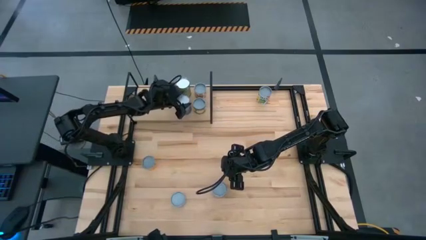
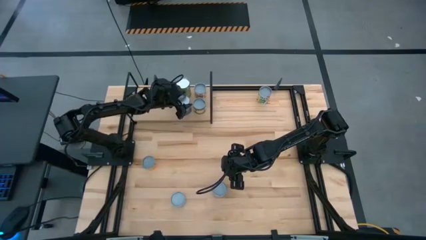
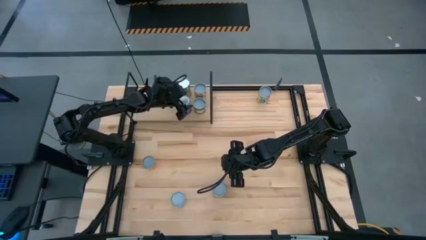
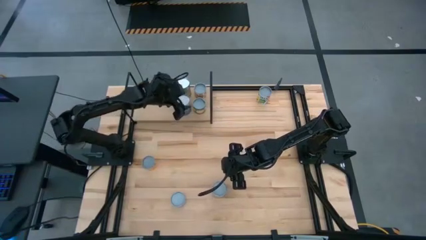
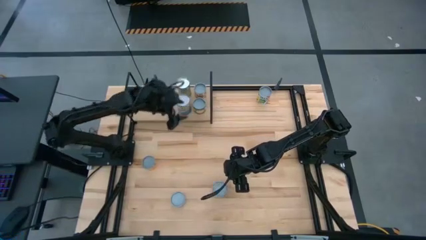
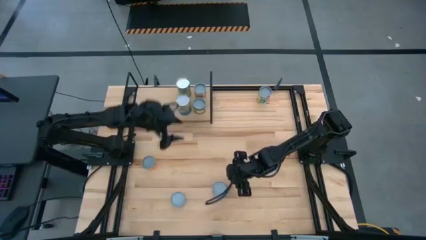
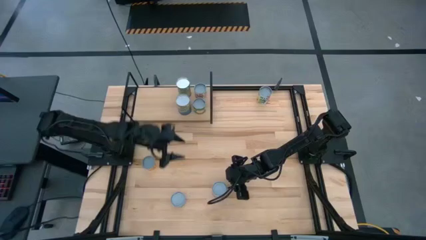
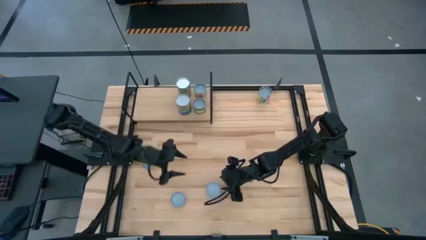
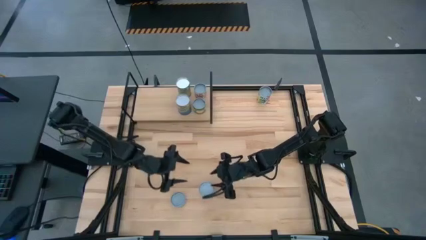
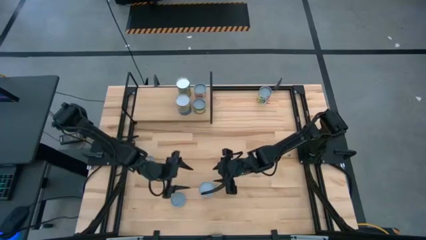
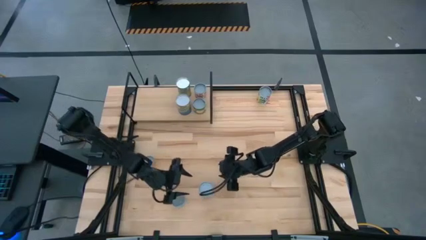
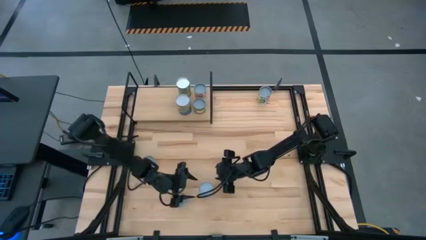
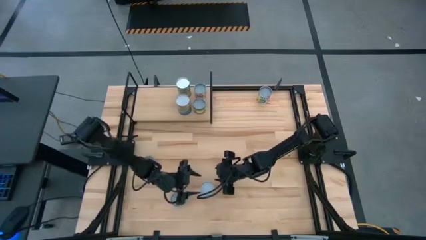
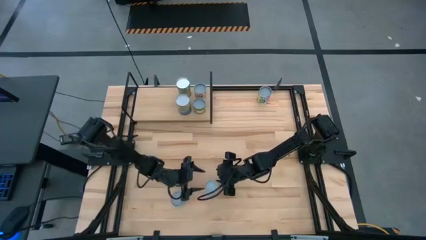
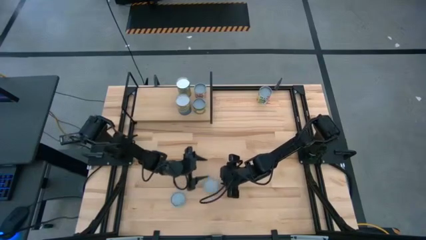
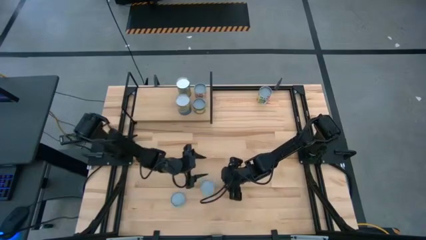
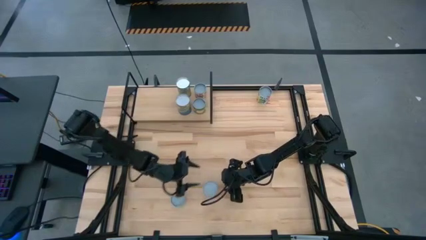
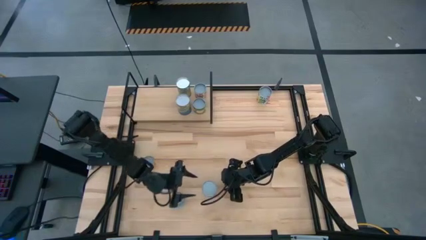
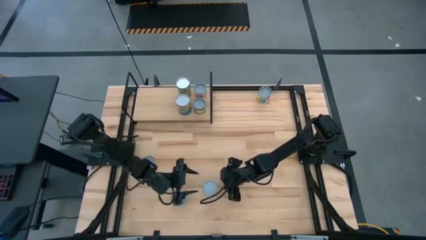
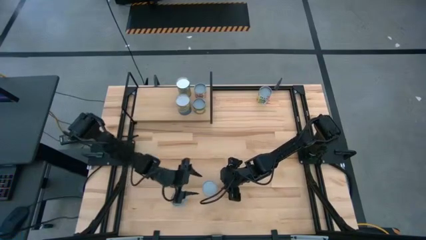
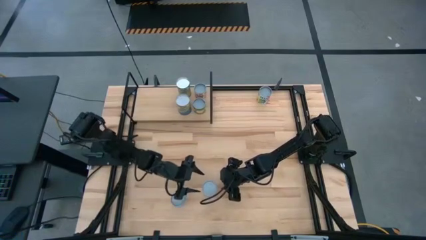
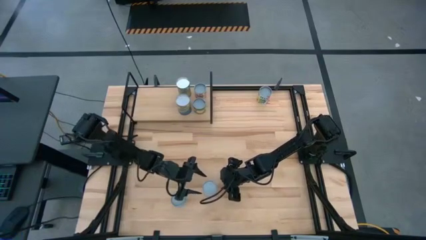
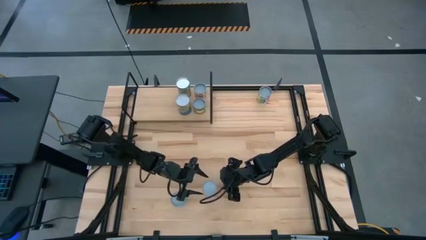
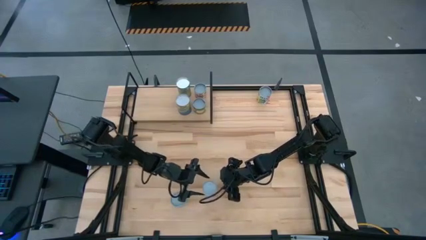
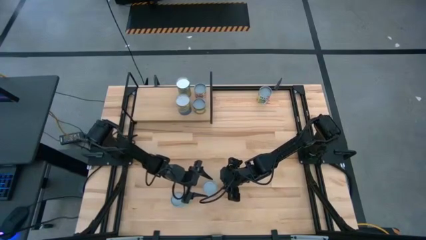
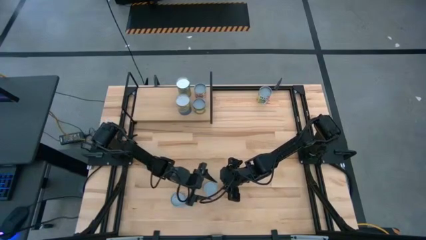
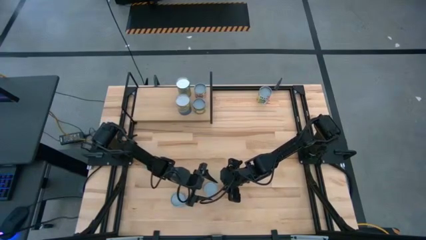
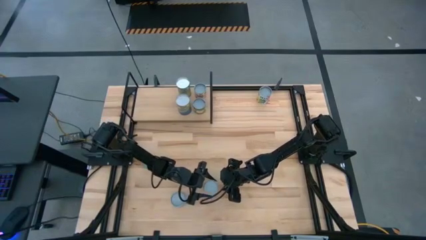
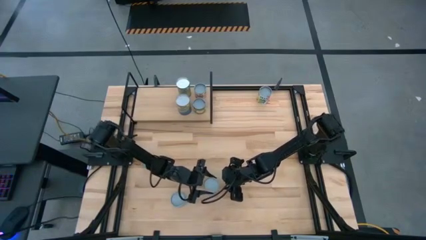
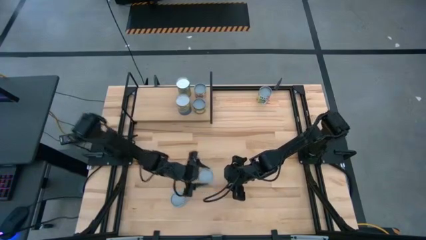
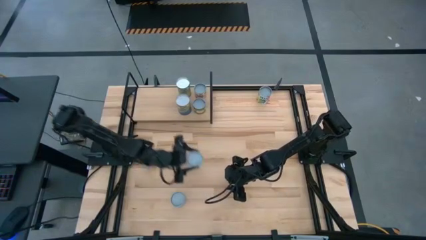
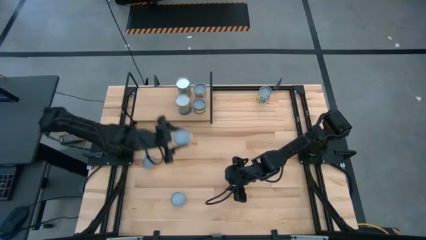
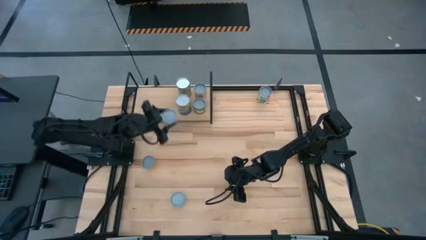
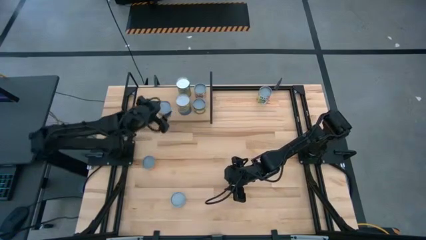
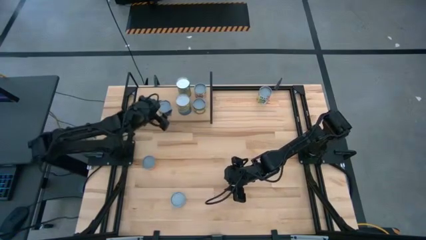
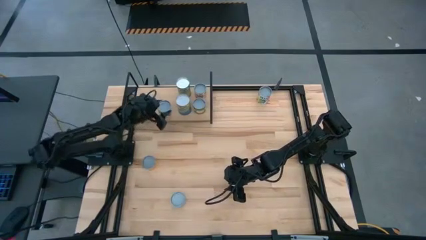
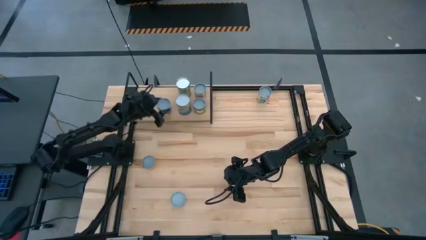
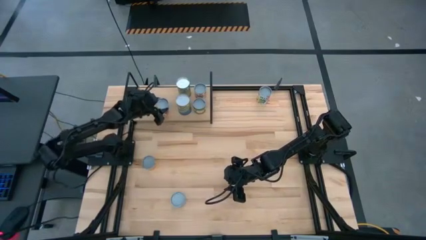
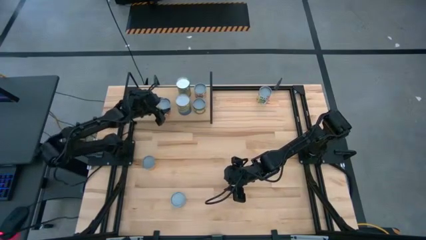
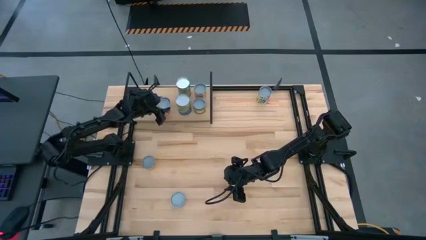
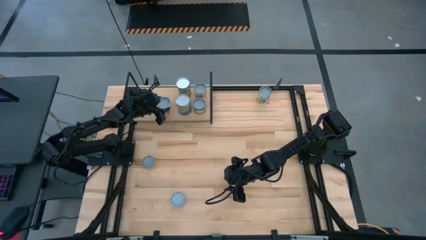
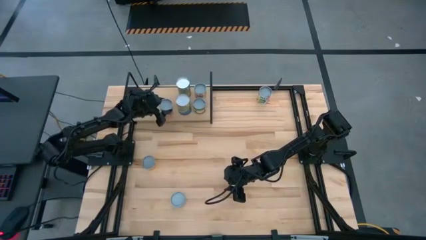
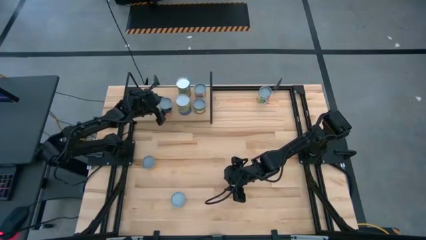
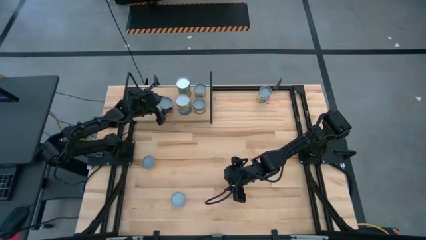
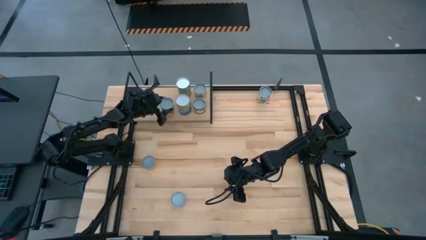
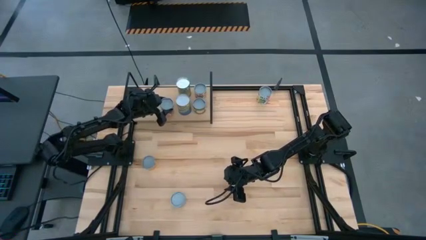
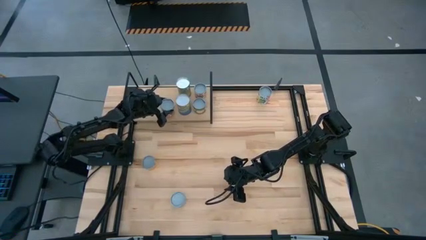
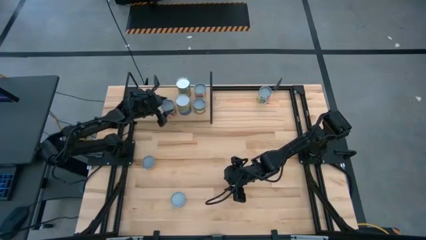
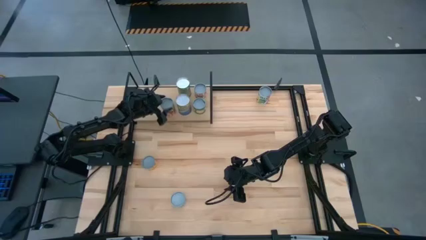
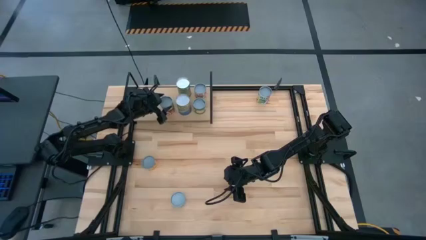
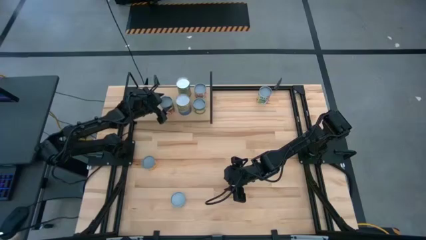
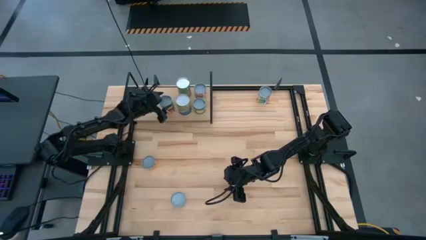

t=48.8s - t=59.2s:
Task: Pick and place cans onto a shelf
Put the canned spaghetti sauce on the shelf

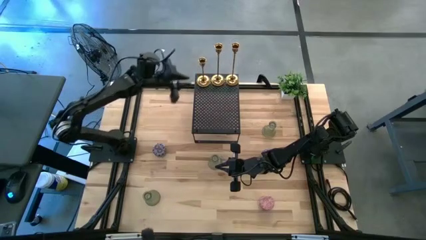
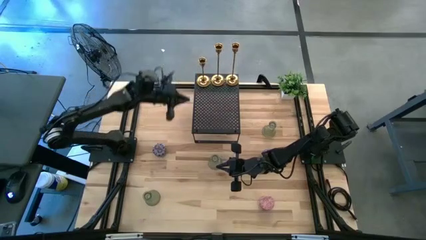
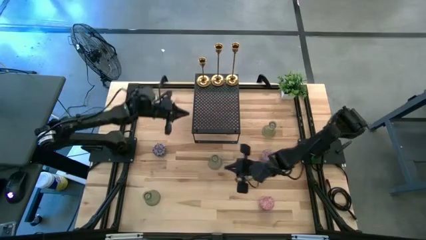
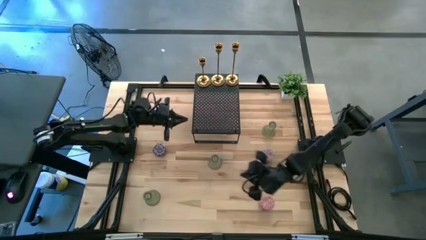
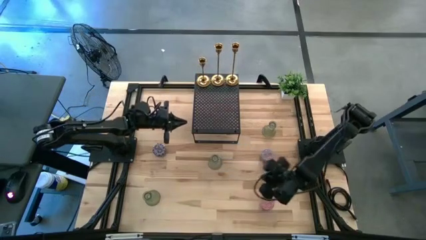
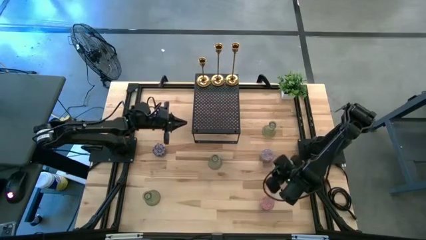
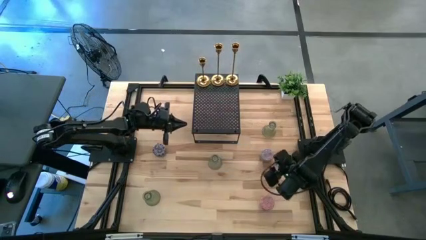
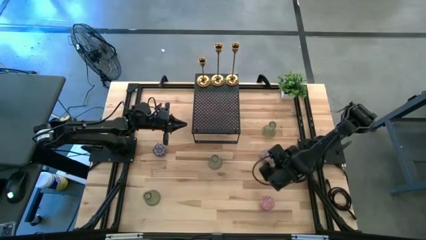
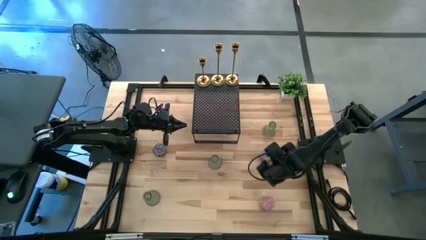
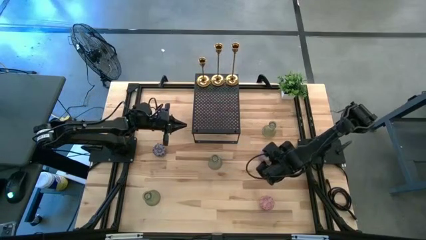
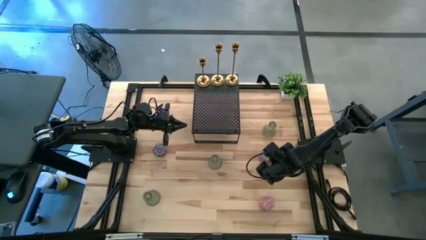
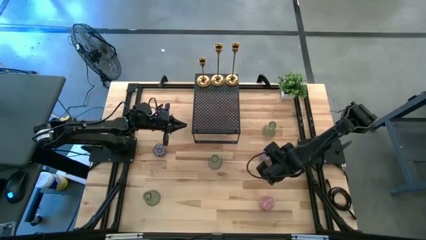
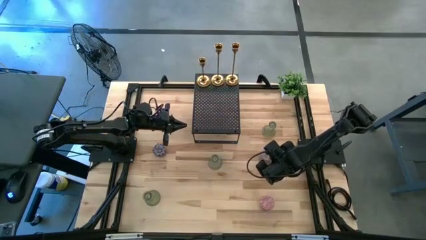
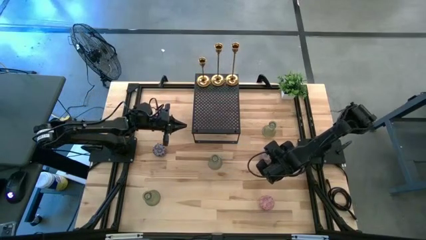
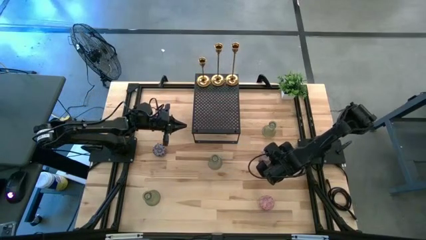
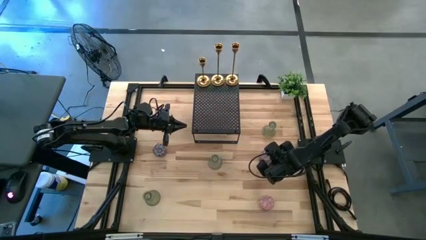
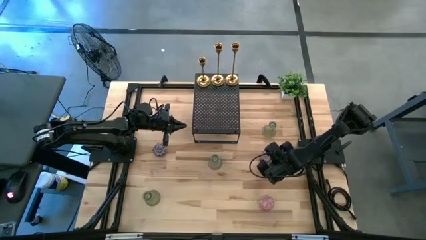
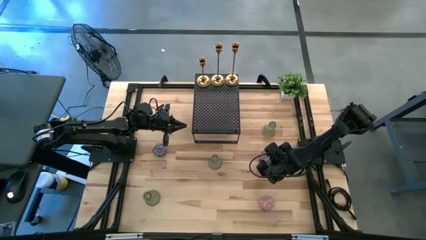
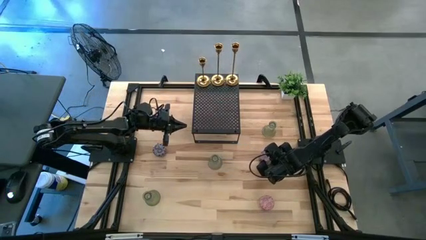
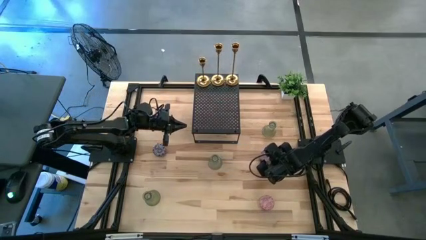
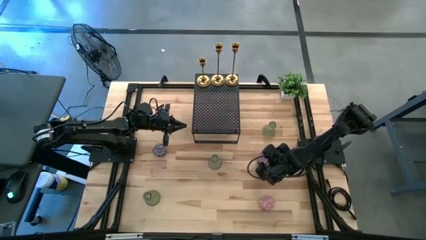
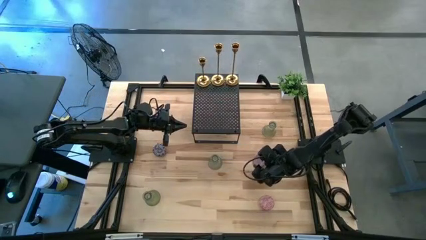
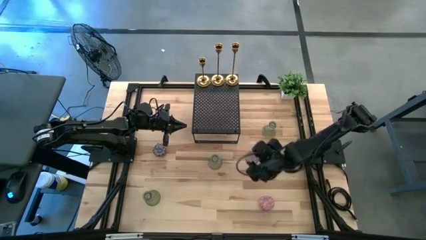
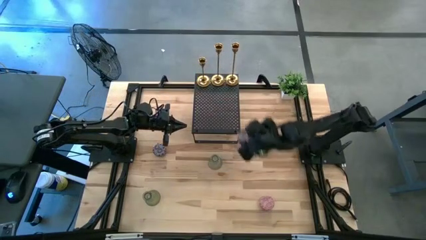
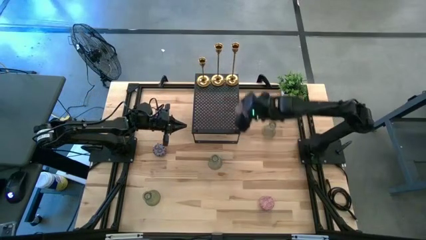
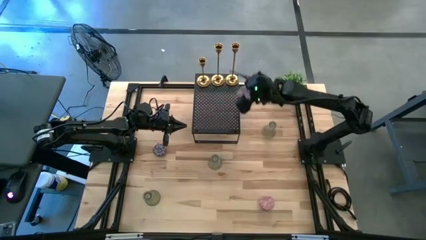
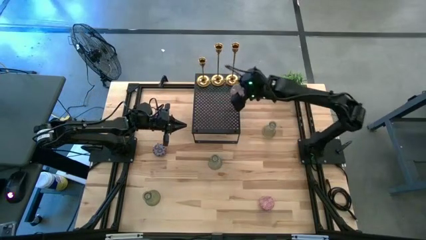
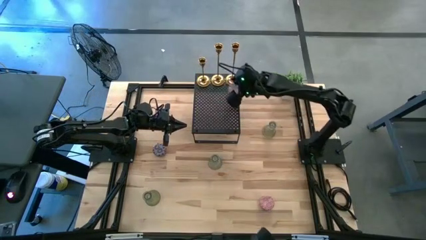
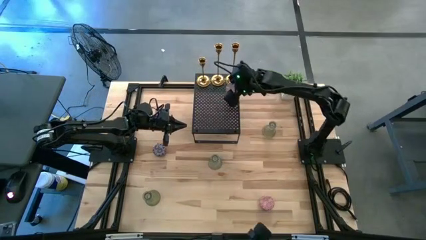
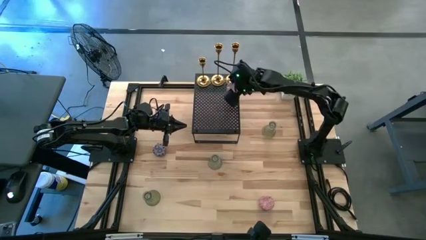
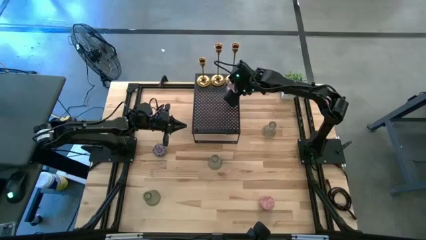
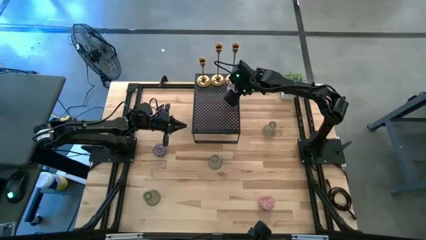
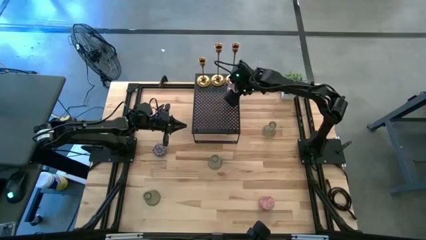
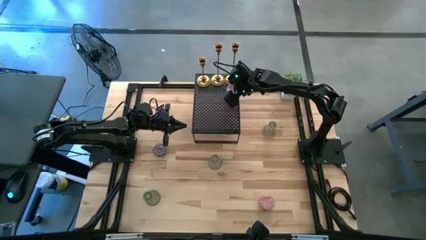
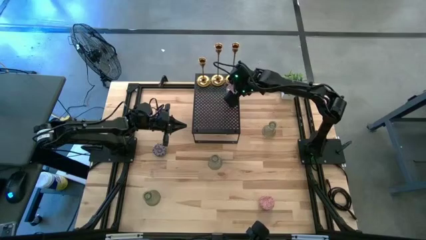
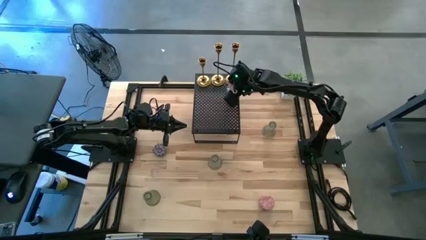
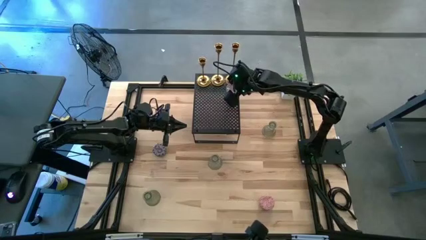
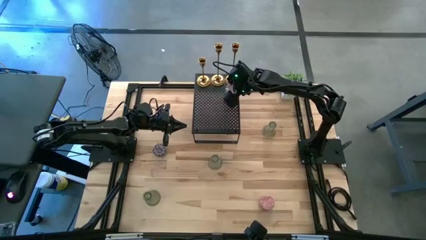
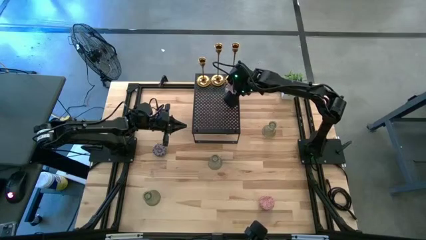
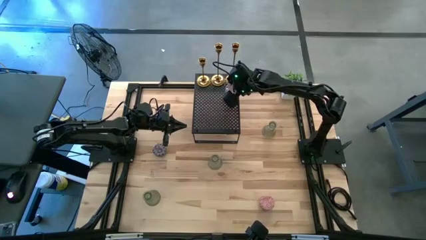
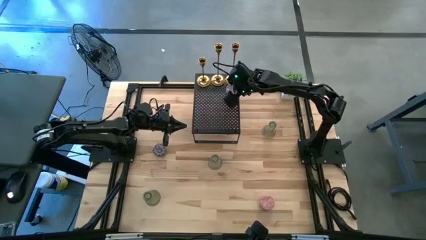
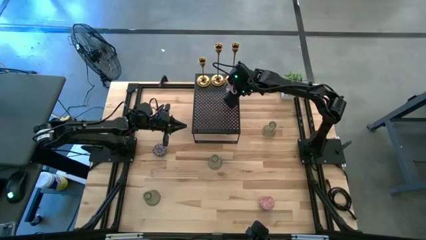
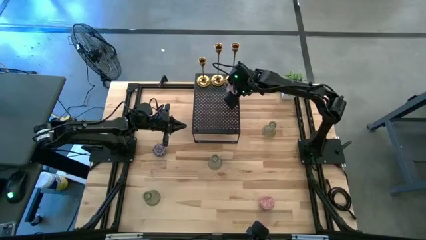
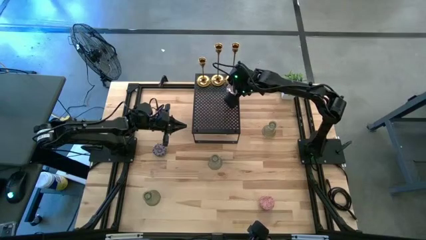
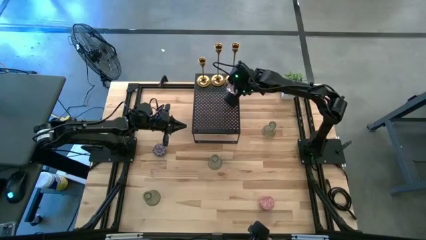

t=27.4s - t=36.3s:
Task: Pick & Place candle stick holders
Put the red scented candle on the shelf
